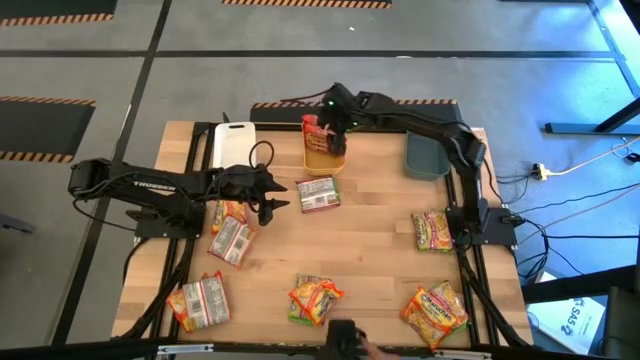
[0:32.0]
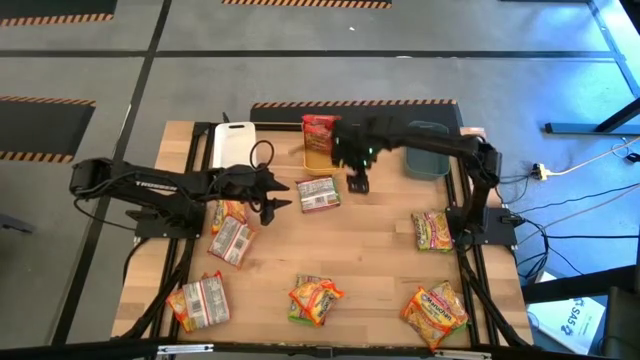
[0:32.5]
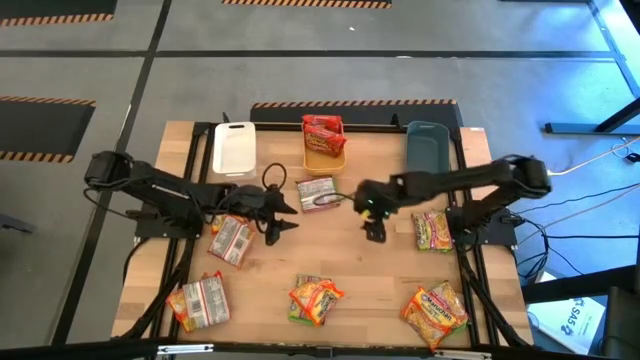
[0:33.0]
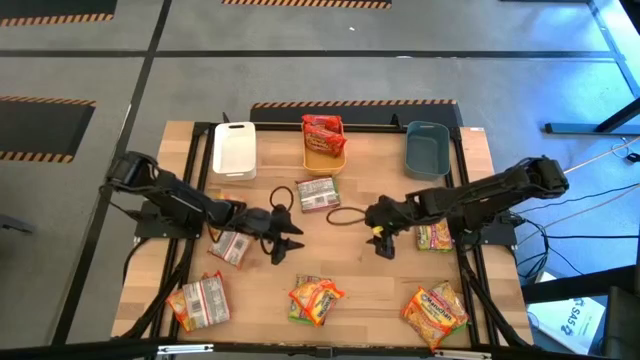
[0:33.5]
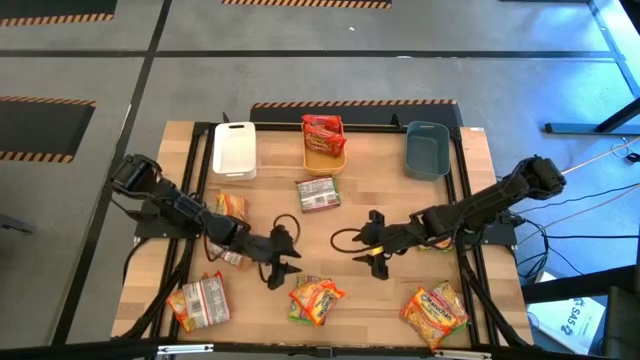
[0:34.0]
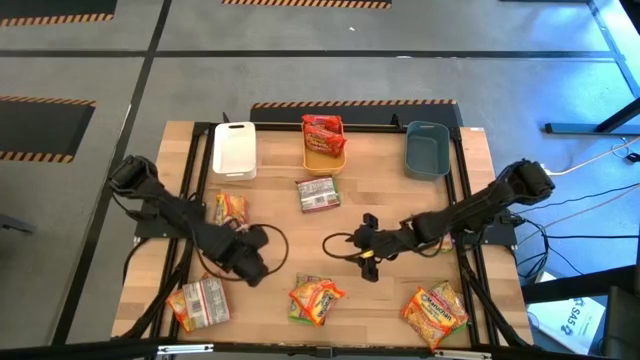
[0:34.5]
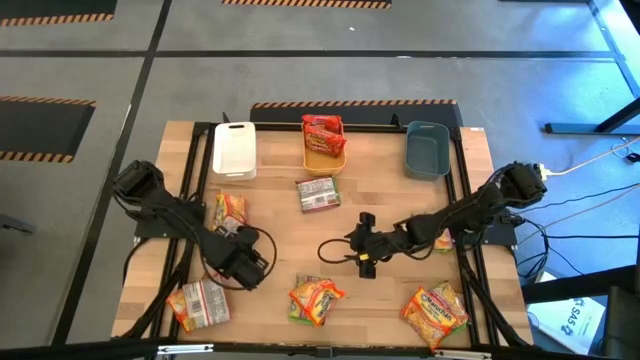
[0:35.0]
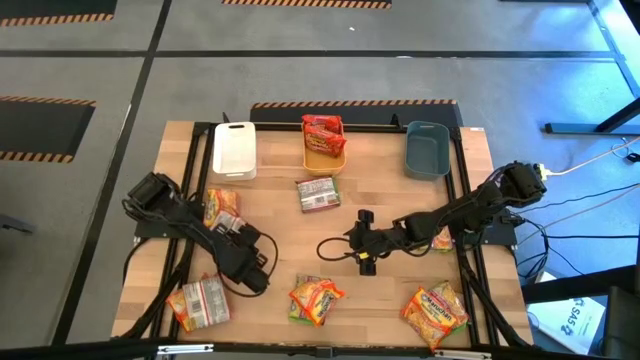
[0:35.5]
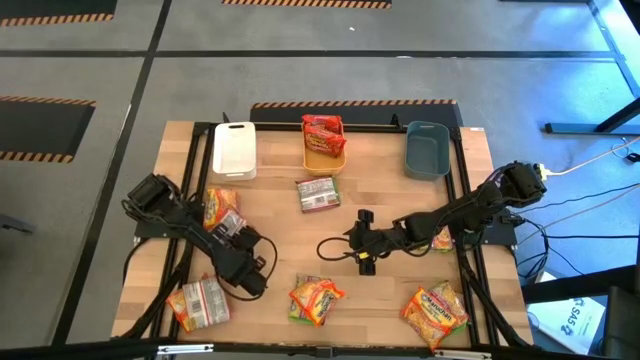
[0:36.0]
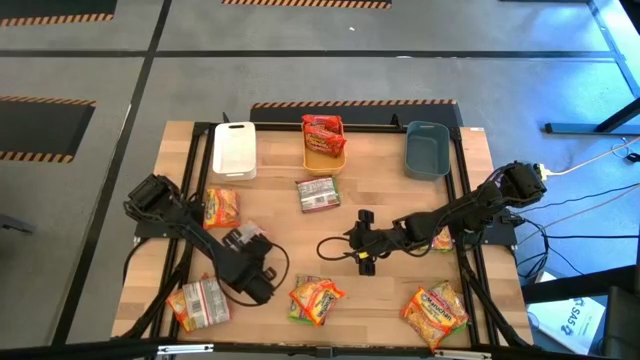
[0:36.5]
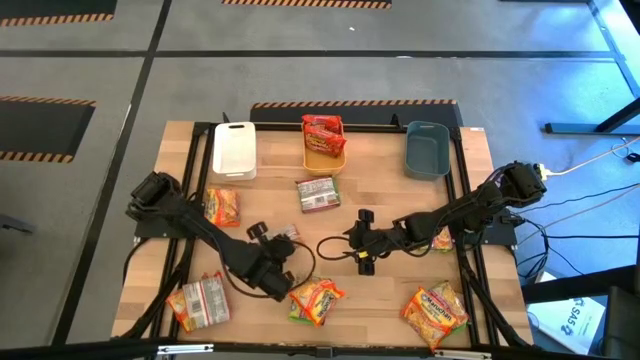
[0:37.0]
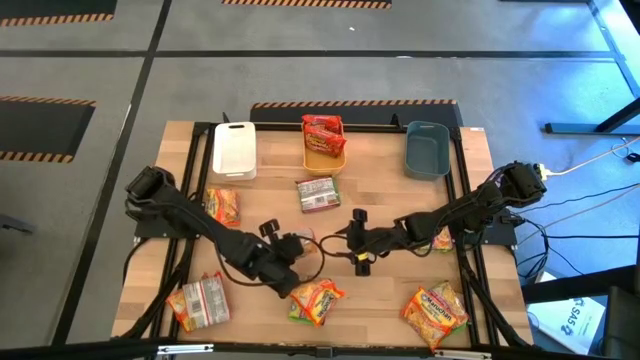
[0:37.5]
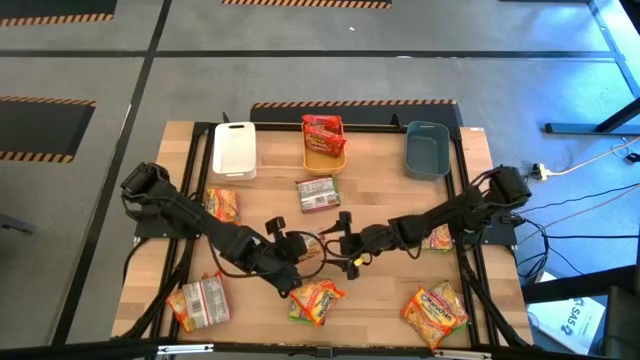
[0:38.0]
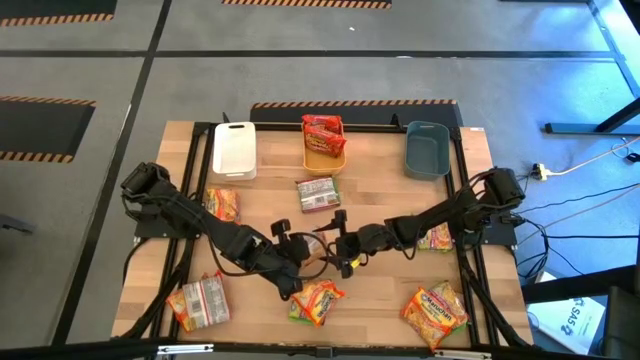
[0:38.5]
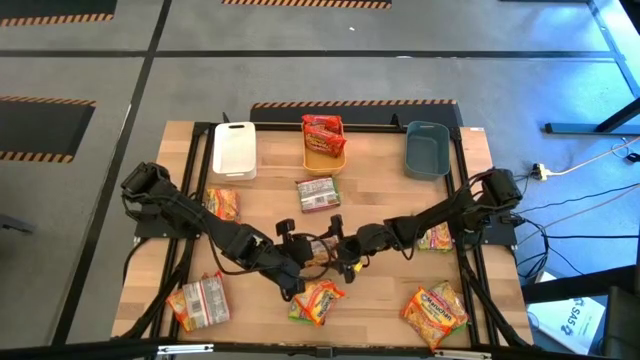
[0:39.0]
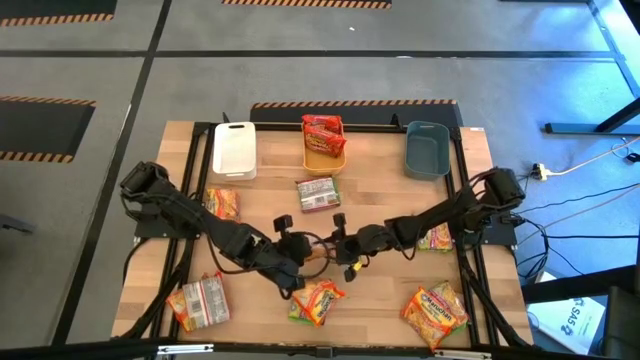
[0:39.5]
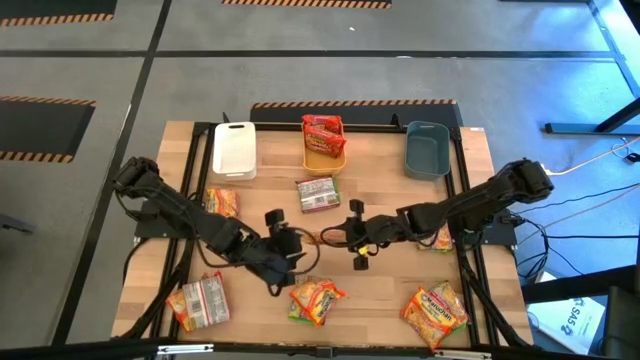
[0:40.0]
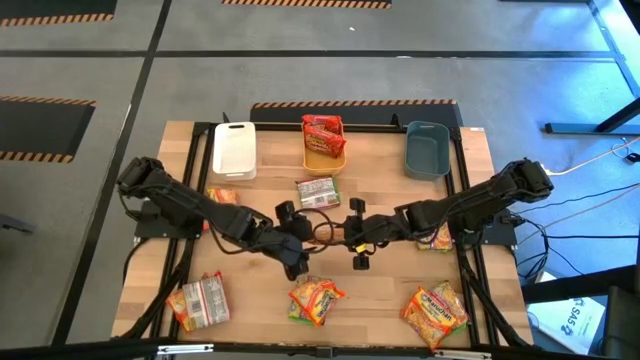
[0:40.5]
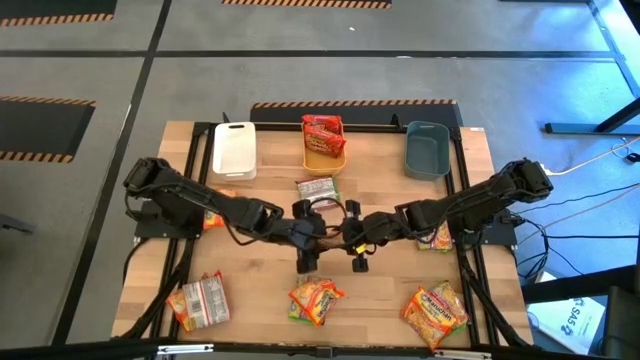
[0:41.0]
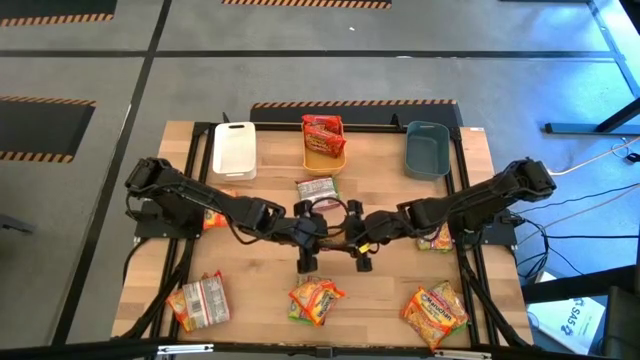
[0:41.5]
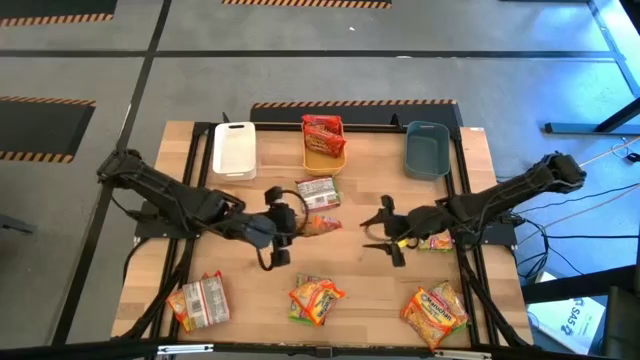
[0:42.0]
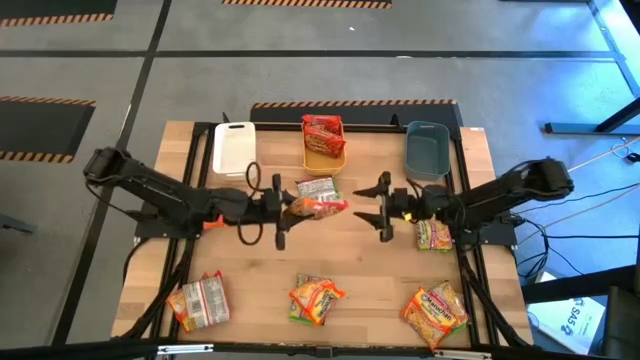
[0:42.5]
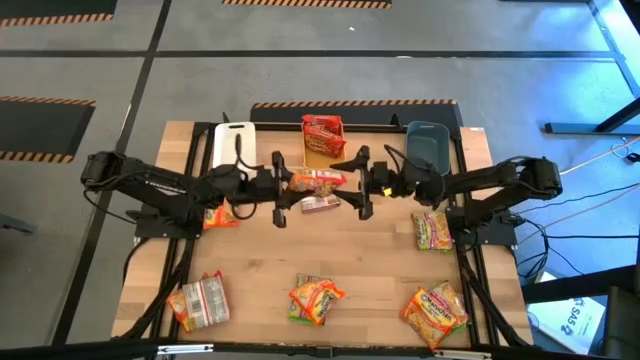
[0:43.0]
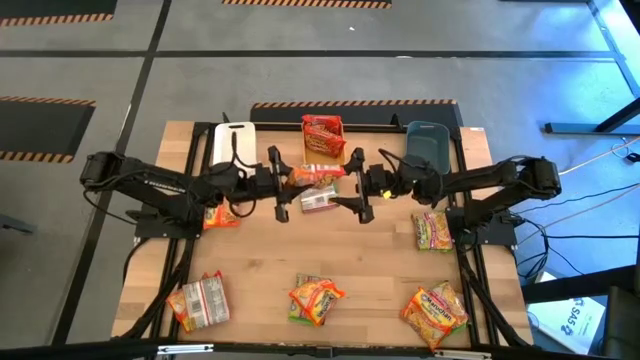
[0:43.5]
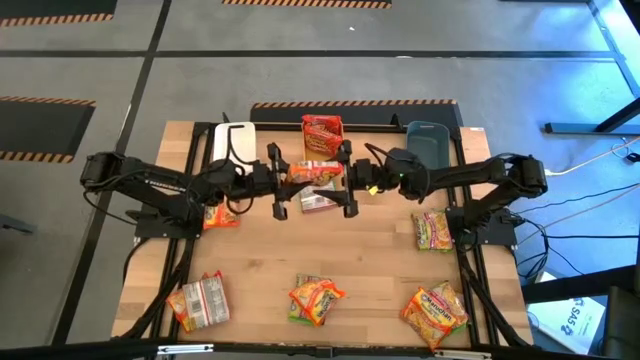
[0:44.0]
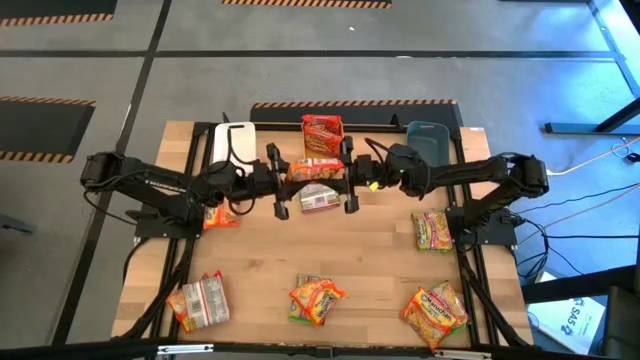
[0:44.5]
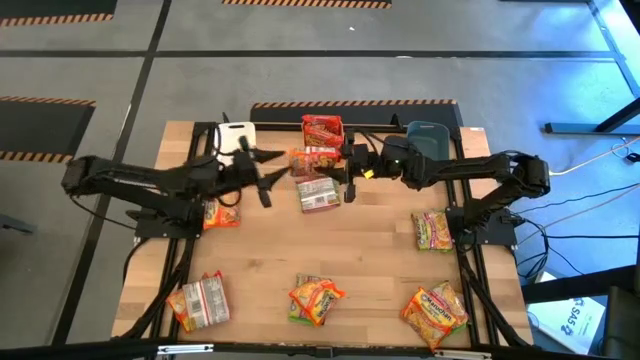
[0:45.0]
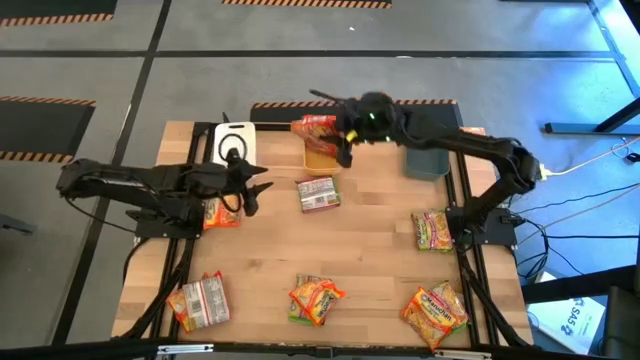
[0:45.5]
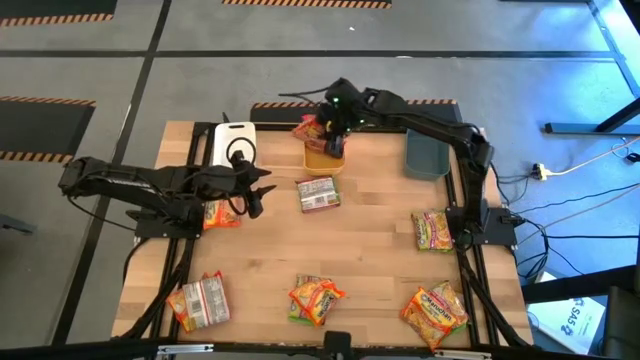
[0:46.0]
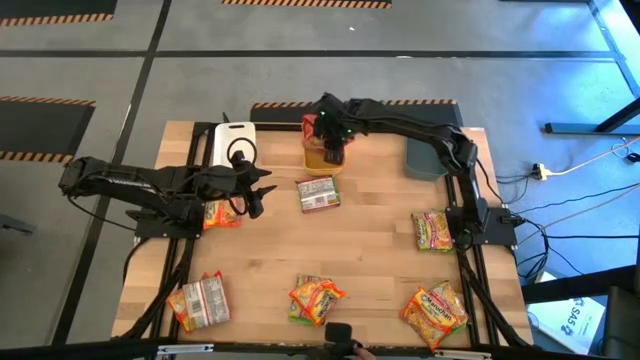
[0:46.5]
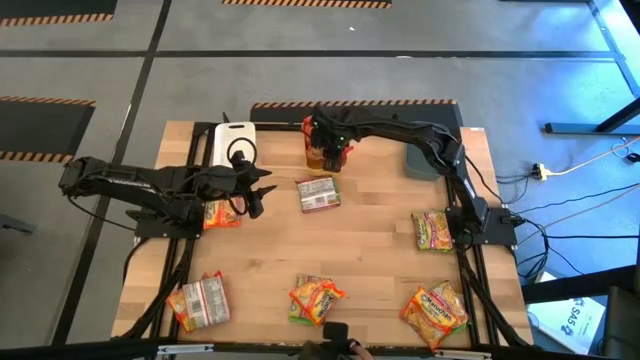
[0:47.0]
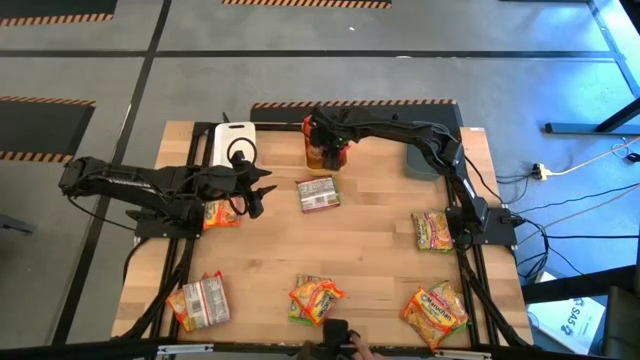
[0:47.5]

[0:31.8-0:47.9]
Task: Sort Maruchan noodles
Put the orange noodle pack into the yellow bin

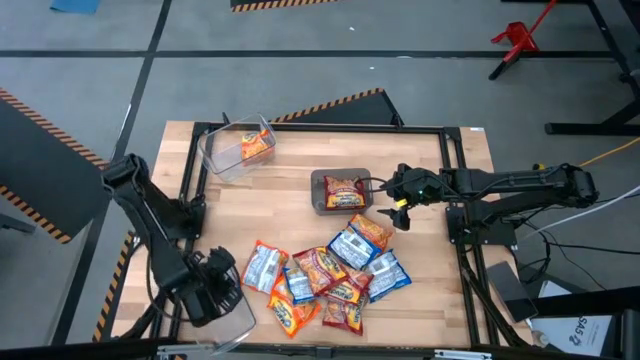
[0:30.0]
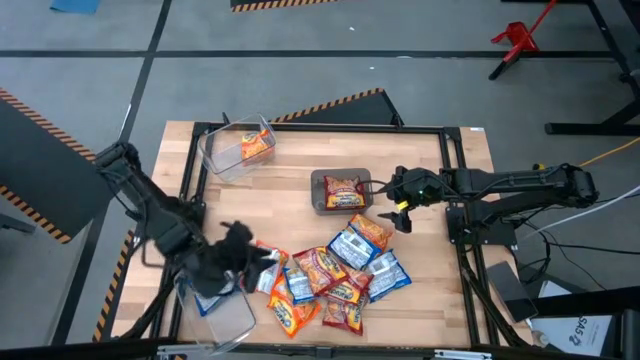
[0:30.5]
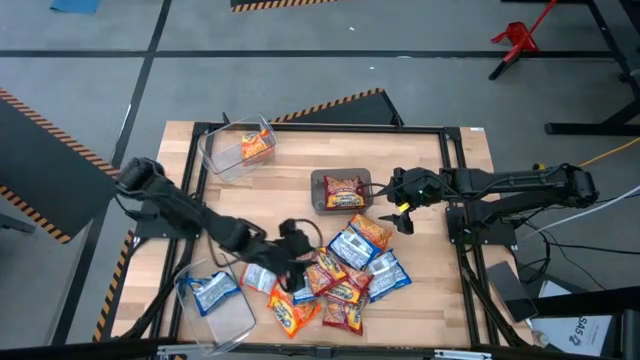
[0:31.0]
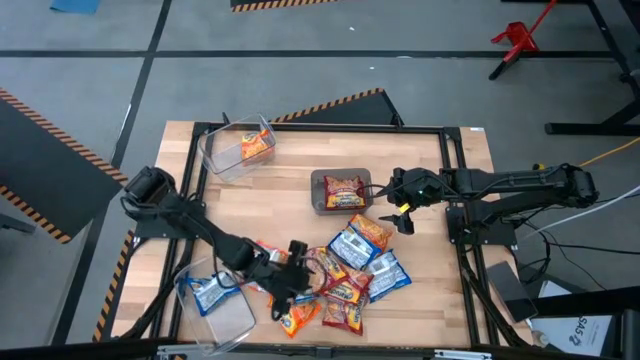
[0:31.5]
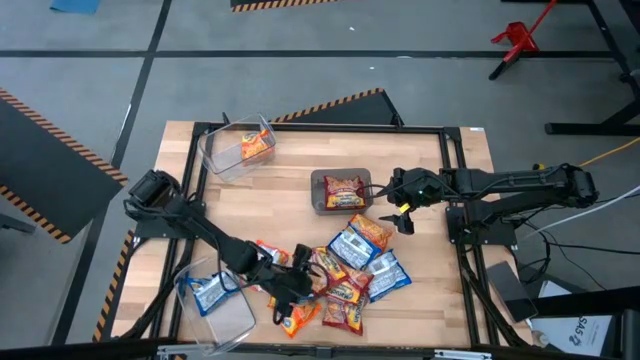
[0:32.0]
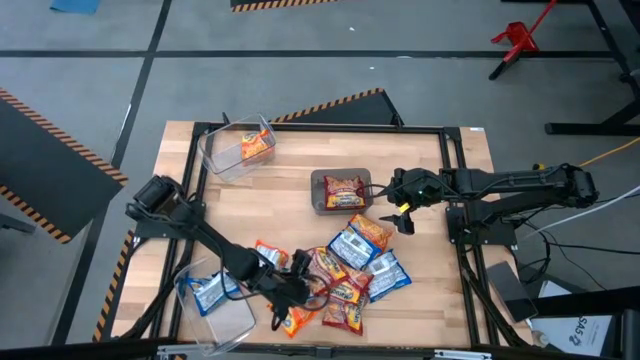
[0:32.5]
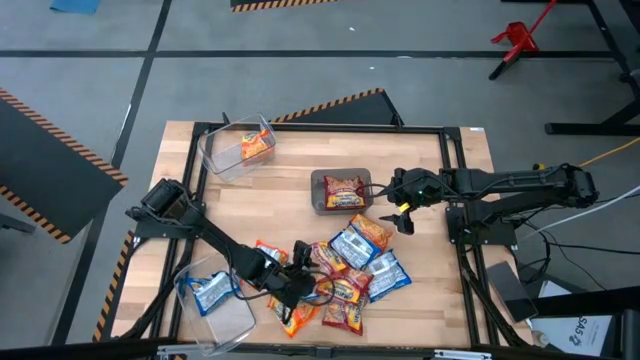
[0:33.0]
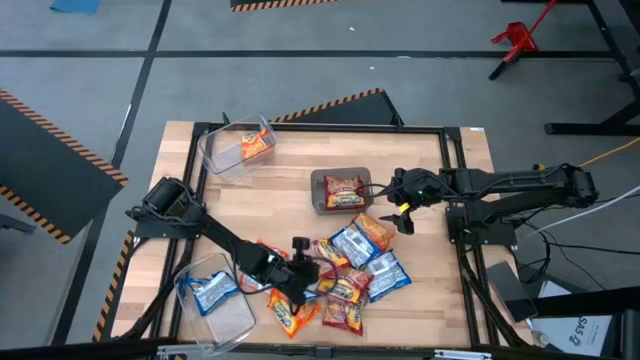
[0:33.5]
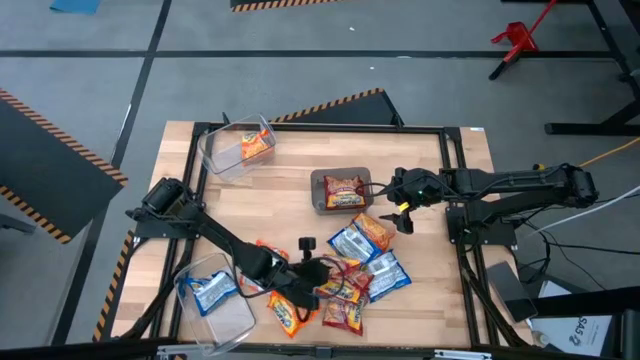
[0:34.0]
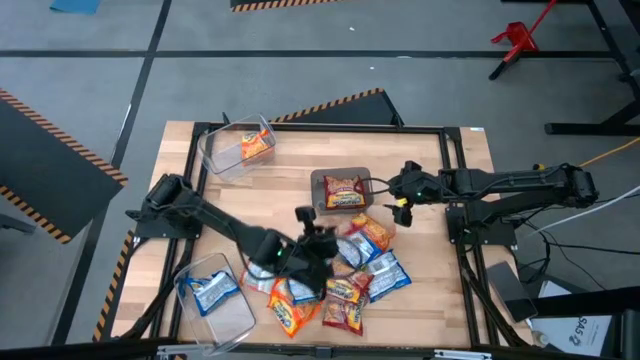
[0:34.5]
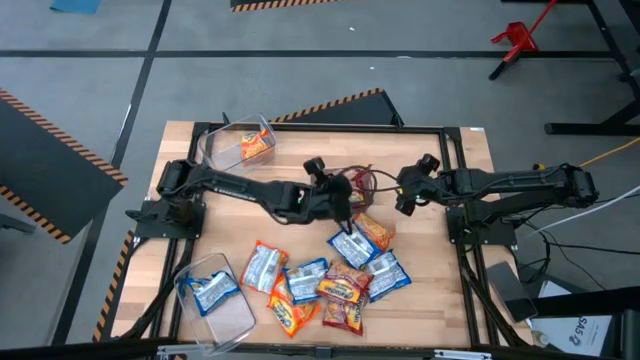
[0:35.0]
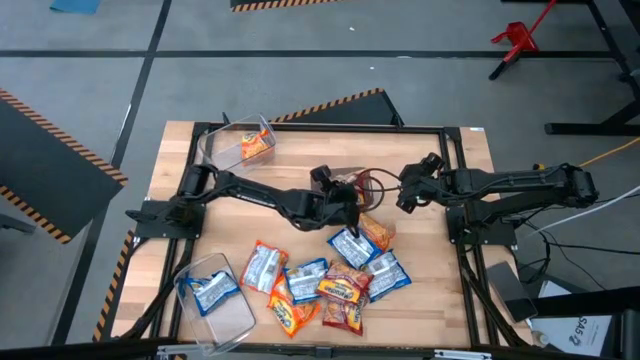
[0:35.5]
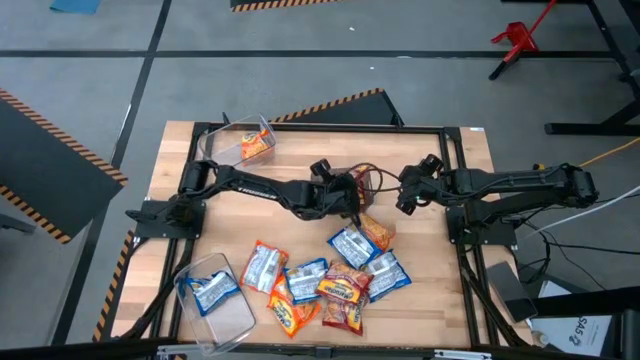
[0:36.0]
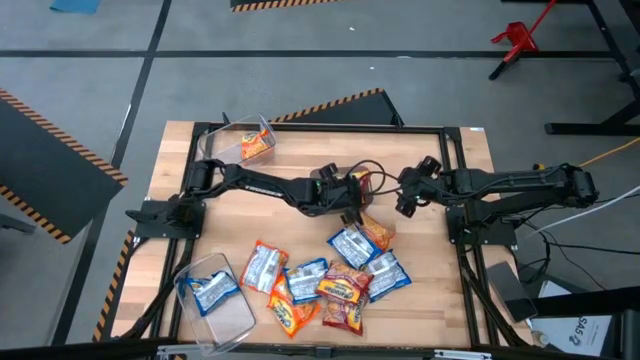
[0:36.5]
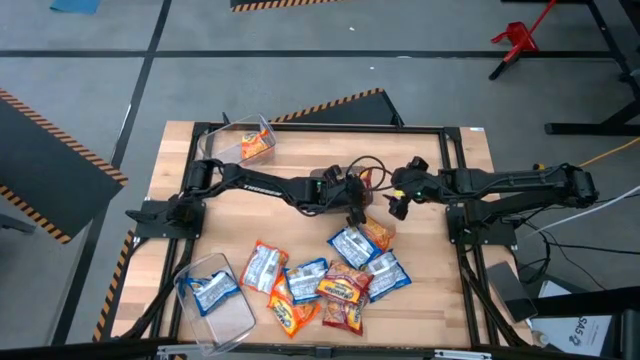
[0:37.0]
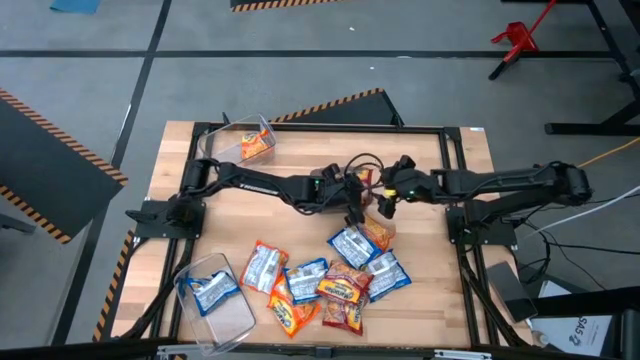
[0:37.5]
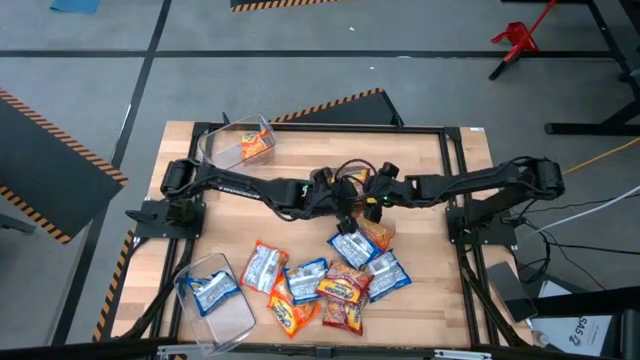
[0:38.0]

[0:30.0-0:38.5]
Task: Sort Maruchan noodles
Put the red noodle pack into the black bin
